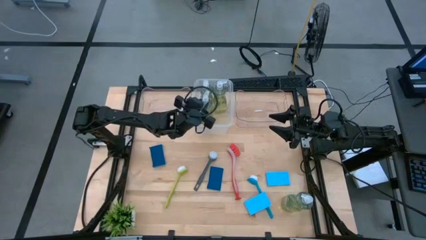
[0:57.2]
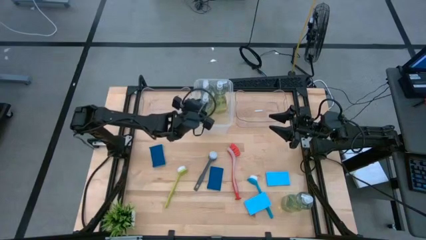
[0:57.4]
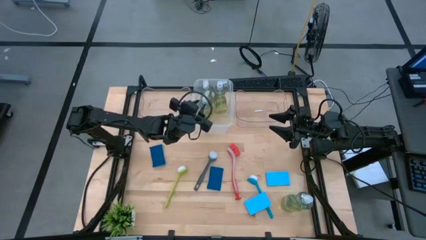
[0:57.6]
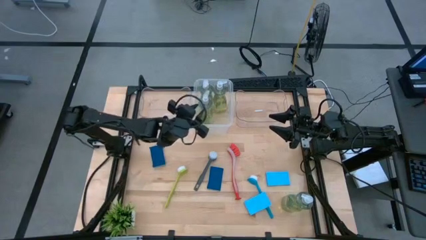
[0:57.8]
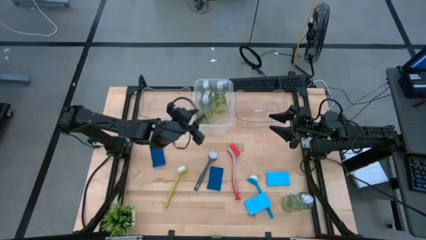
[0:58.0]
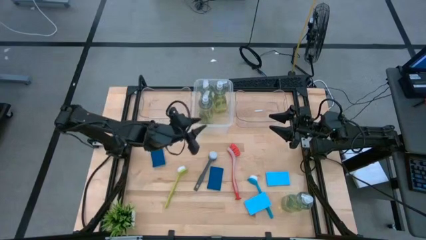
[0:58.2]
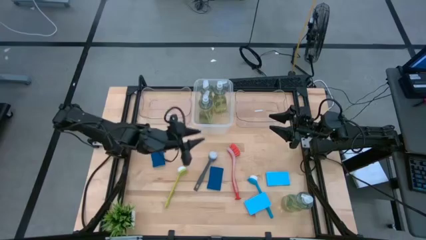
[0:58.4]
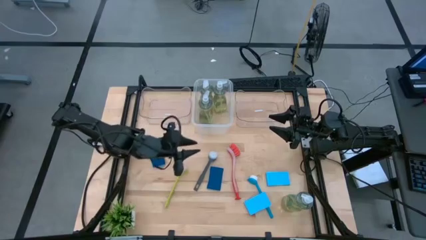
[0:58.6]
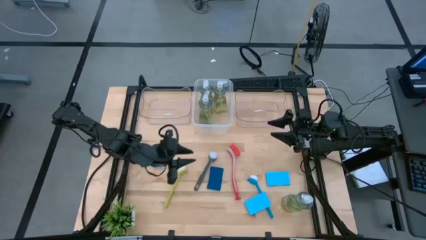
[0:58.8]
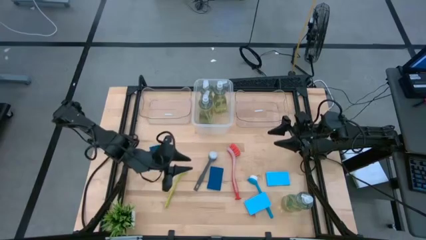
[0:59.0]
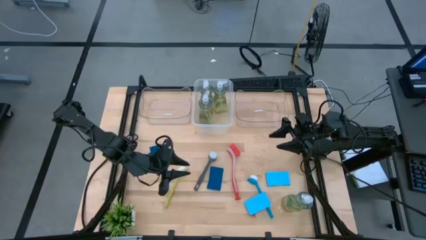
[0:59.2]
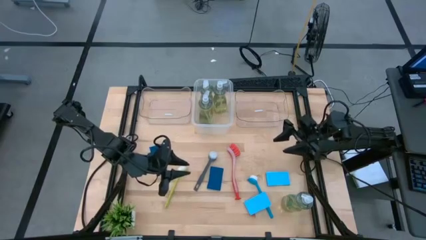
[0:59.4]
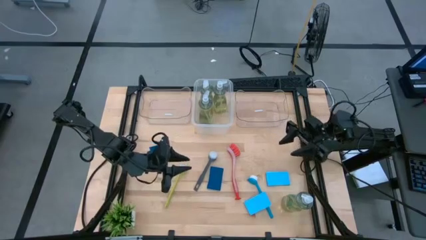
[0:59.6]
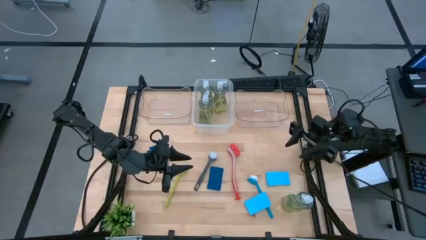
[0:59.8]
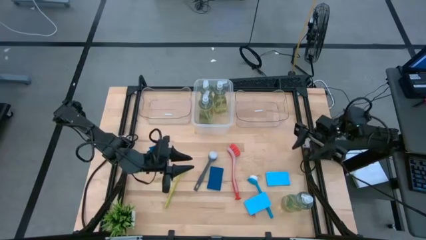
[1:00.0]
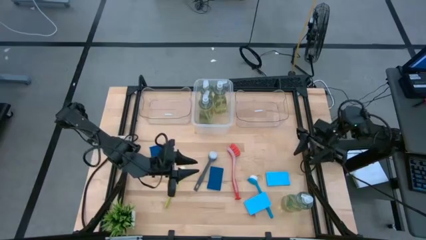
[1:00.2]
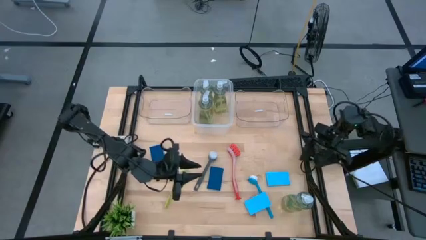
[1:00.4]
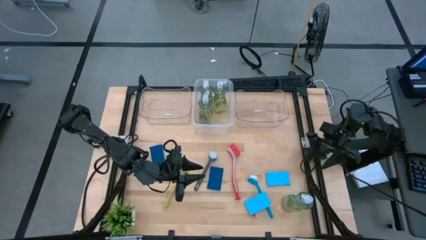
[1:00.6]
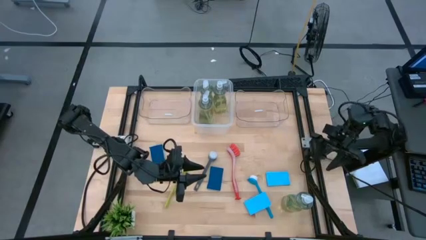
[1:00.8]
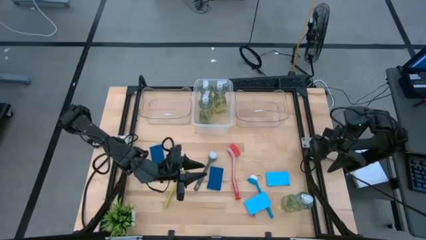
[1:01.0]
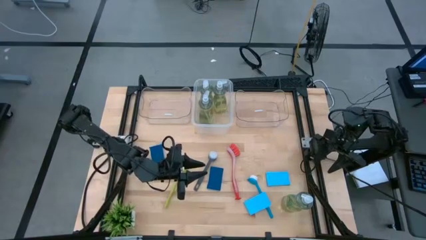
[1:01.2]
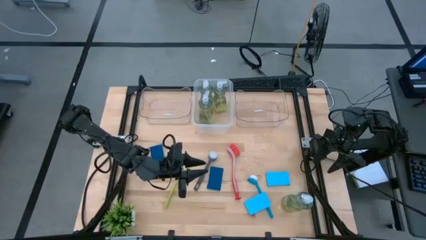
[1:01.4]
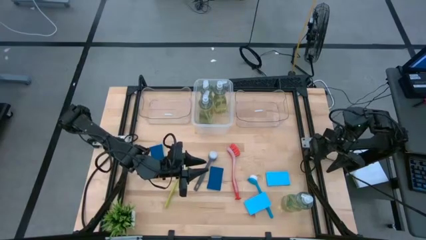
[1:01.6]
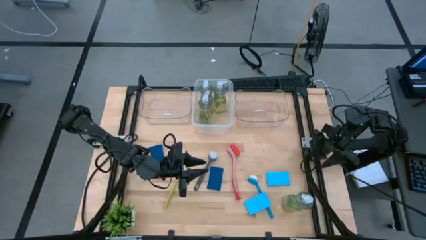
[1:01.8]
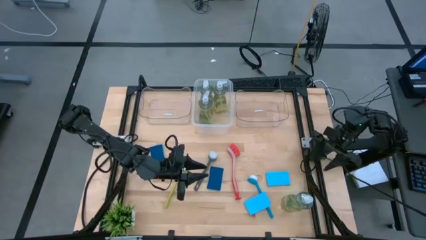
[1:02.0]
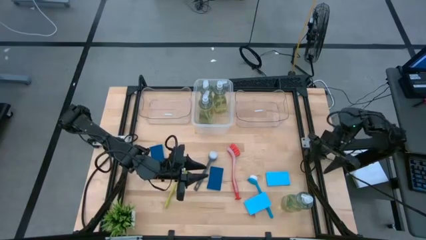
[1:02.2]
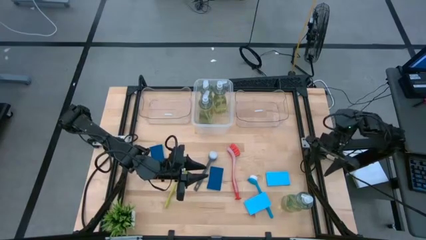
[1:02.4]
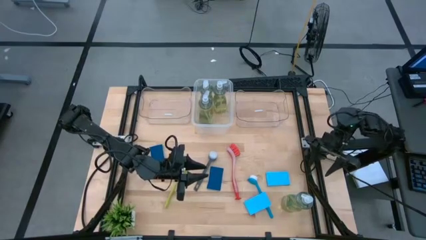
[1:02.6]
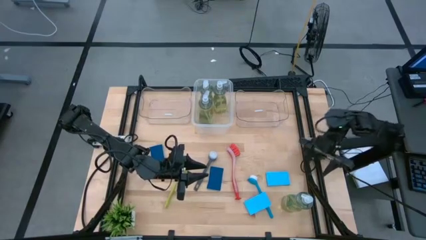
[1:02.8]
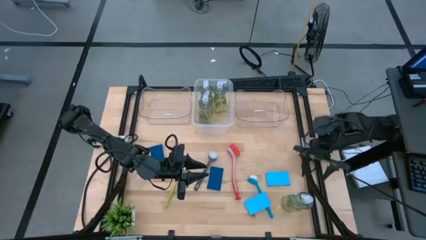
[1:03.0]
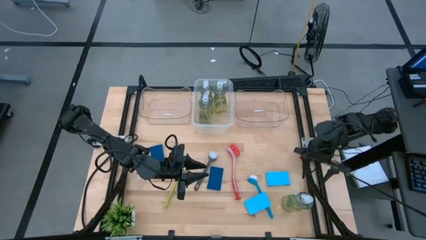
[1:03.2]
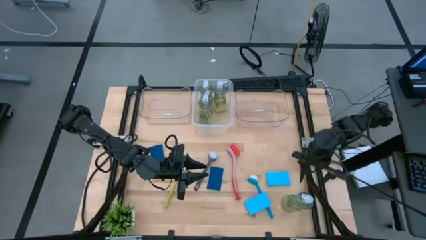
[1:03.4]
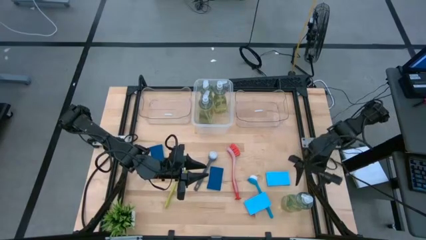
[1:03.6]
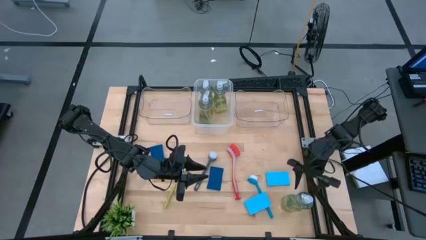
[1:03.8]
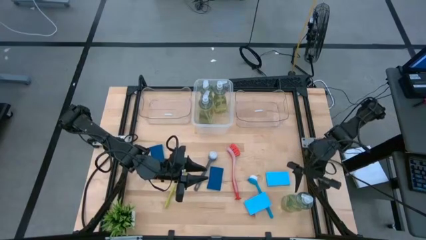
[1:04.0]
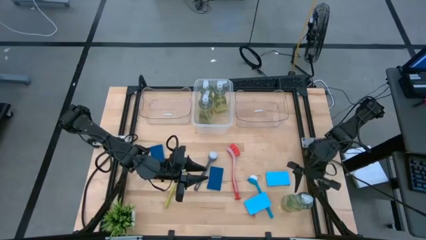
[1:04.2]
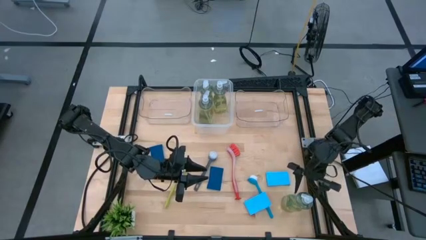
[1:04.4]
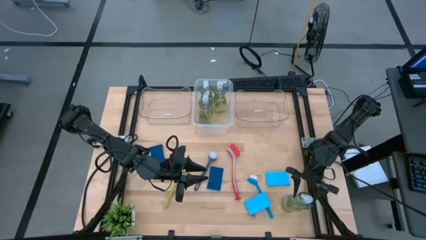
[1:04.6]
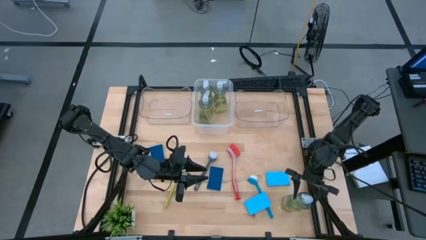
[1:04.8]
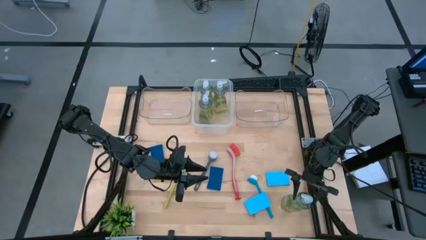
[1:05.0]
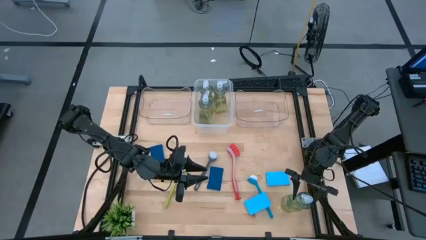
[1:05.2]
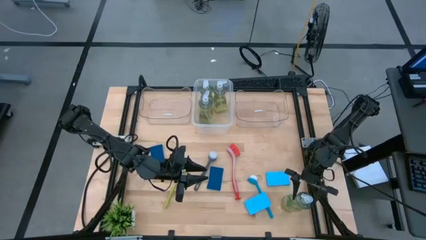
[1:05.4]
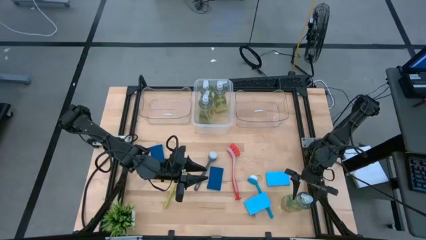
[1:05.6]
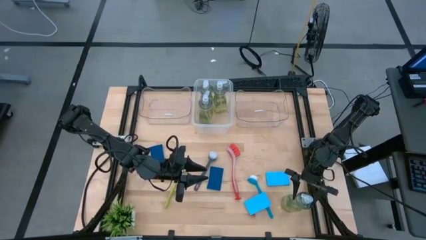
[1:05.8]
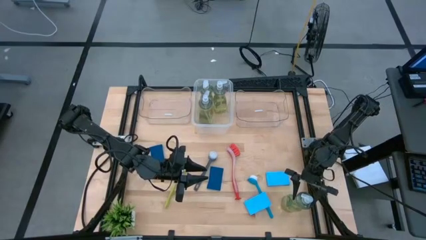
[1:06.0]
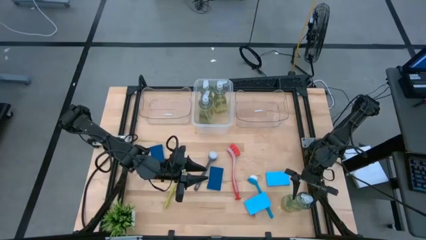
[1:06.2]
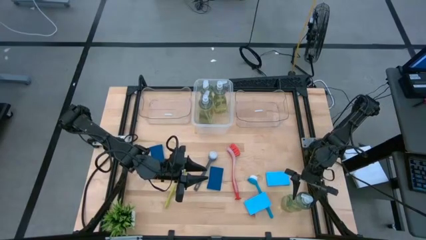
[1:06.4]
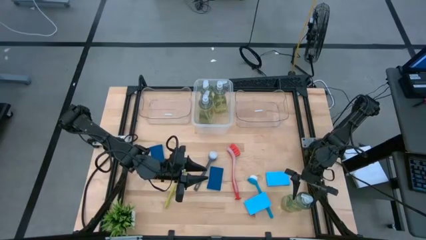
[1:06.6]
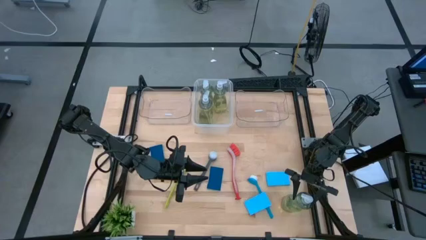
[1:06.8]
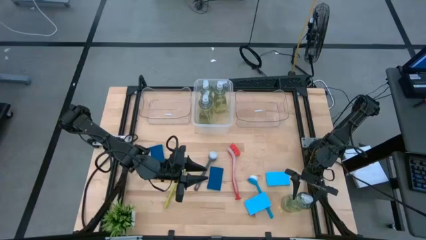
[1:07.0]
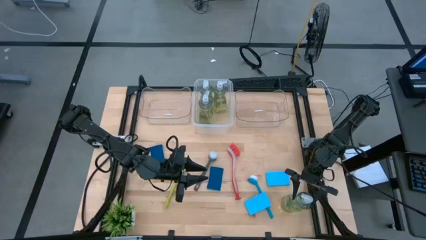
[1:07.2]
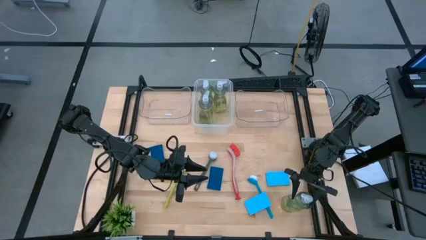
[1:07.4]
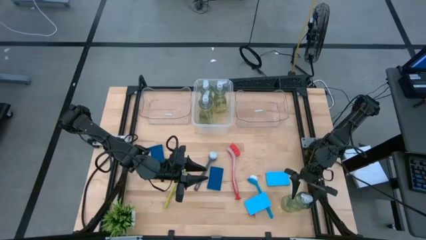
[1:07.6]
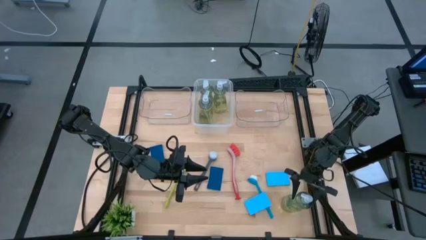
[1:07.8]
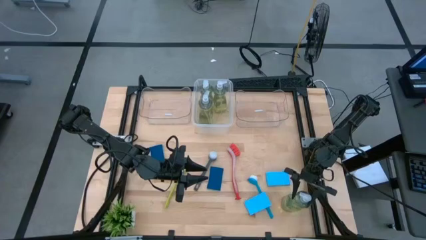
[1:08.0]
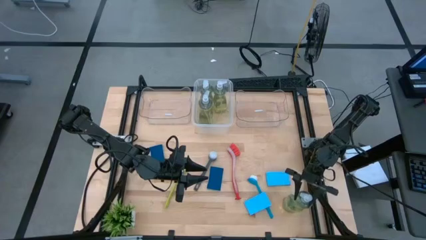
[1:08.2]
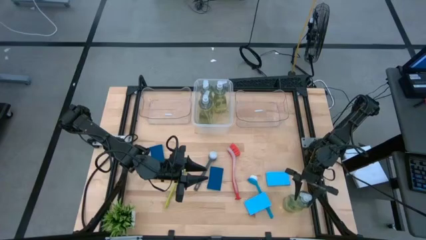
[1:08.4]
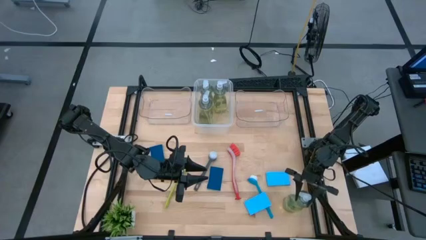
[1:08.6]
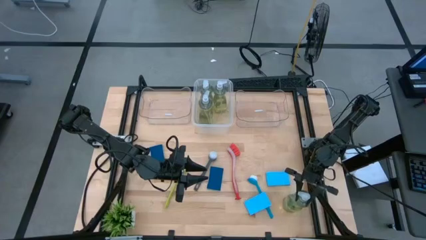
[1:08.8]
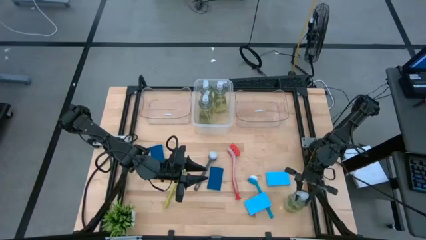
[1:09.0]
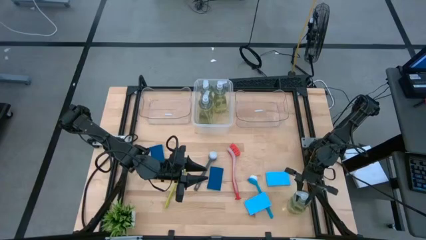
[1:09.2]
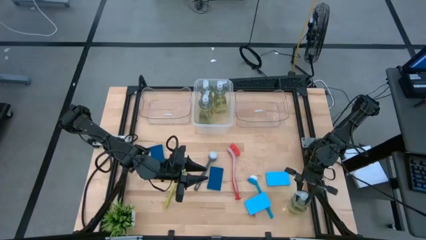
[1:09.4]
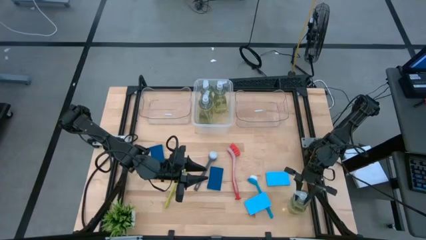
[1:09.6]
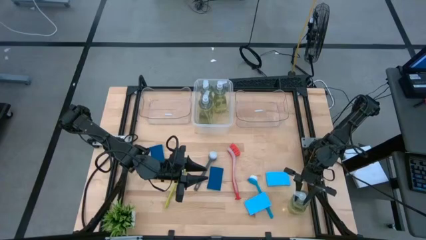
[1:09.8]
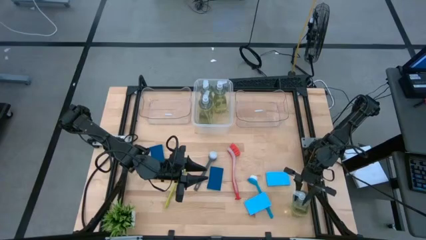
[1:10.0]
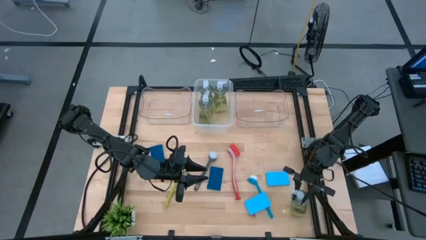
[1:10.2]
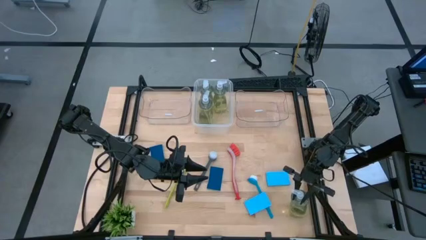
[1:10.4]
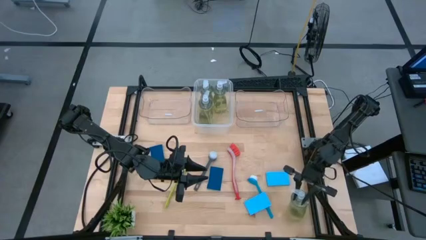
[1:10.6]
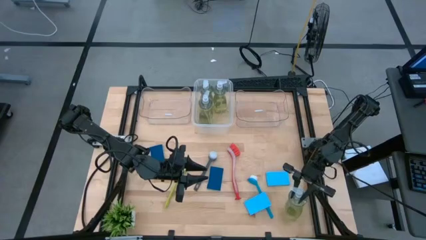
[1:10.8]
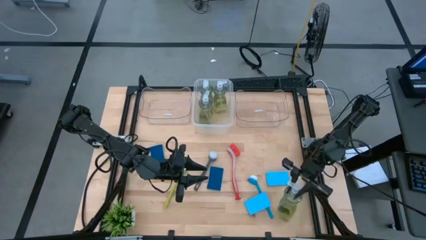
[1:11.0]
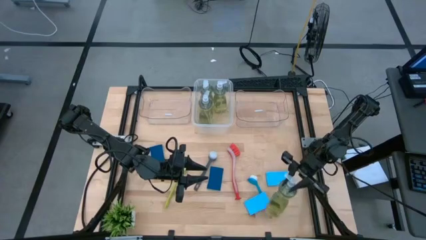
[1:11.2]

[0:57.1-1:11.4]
Task: Pick & Place Kitchen Sink Supplies
Put the green soap dispenser into the white transparent bin

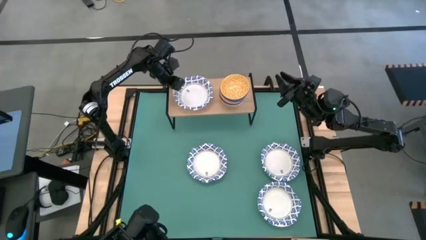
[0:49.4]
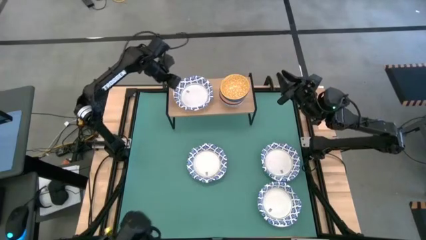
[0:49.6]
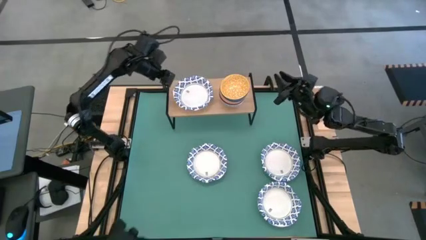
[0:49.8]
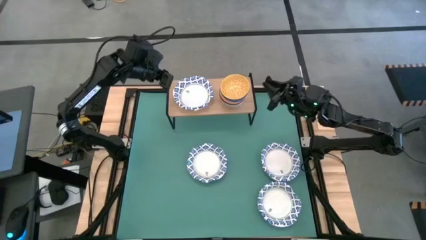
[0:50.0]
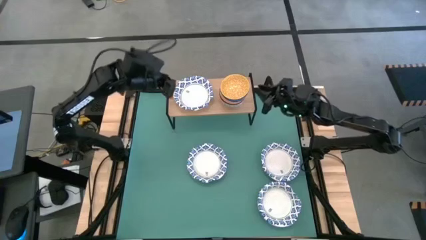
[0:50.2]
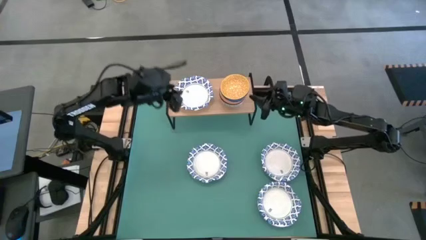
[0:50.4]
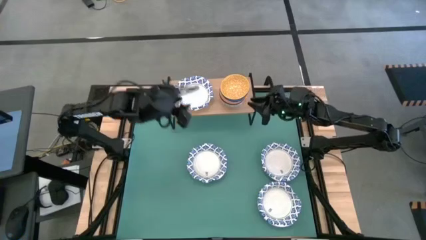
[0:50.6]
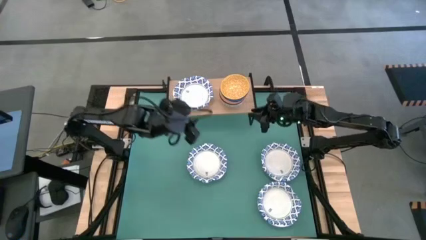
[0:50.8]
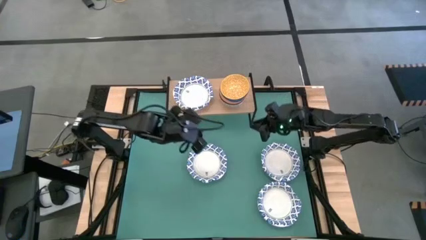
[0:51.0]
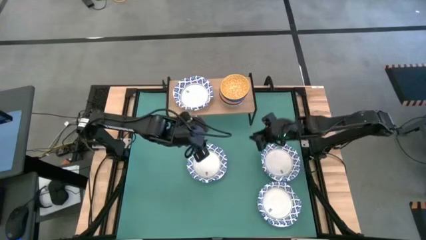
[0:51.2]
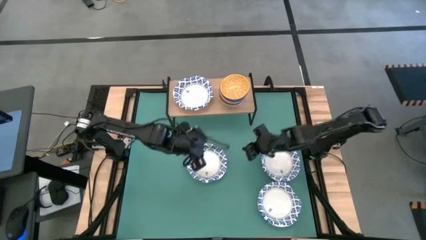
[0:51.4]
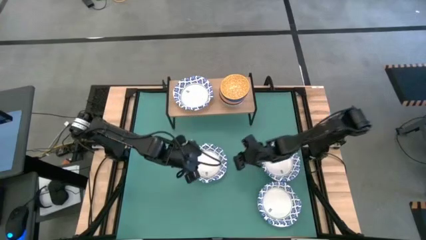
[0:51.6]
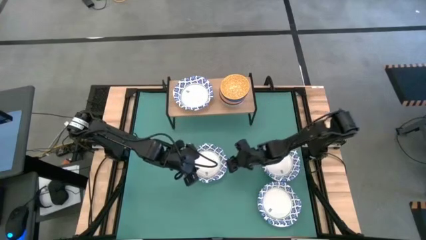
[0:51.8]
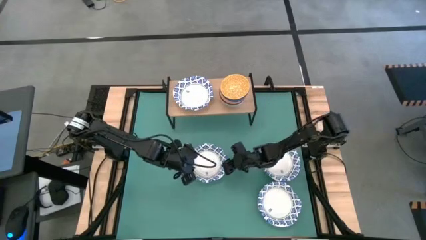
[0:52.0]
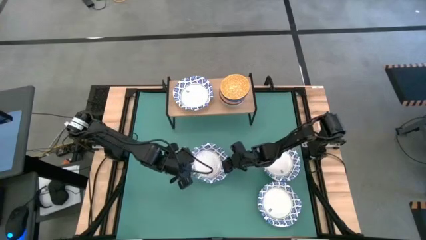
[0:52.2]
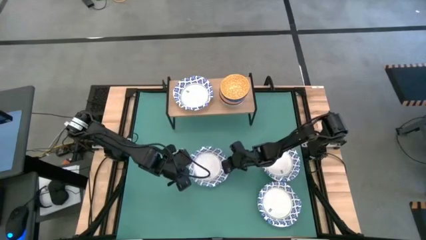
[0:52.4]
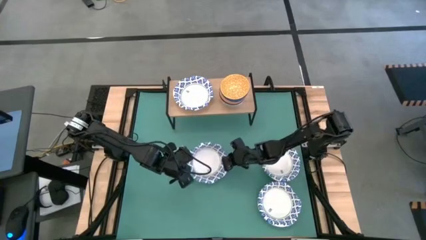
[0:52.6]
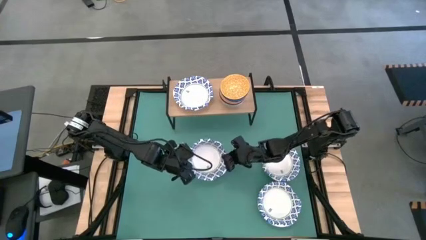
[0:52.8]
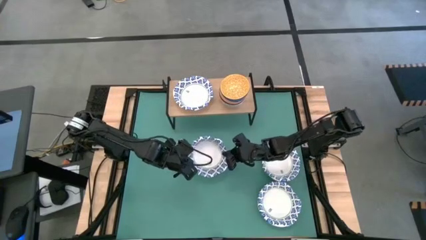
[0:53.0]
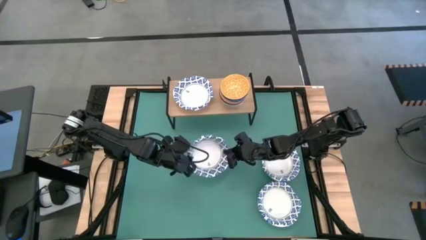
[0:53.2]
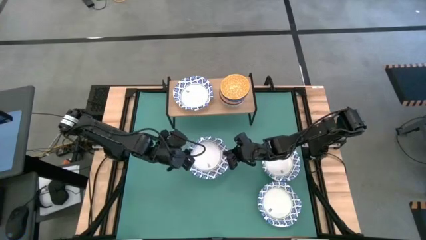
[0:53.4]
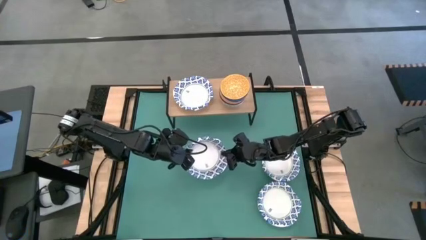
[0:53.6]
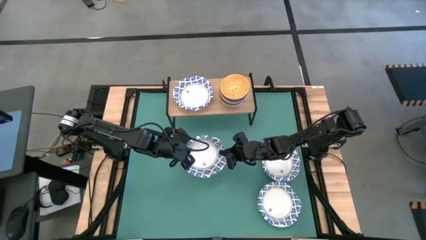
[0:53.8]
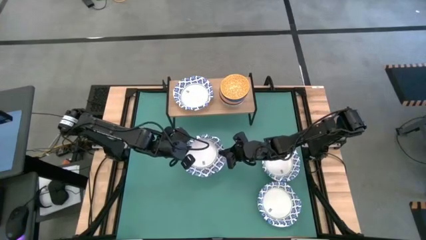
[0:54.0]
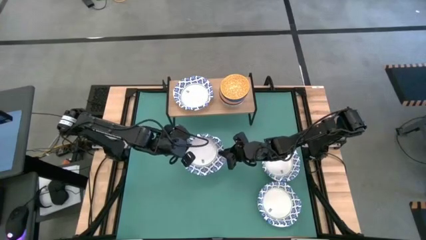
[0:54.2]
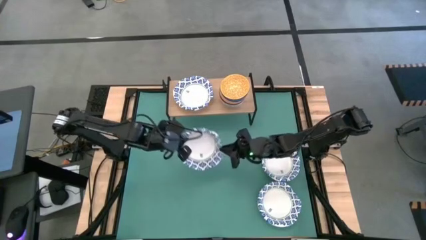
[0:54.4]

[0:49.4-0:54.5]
Task: Place and stack bowls onto a shelf
Stack the white bowl on top of the white bowl on the shelf
